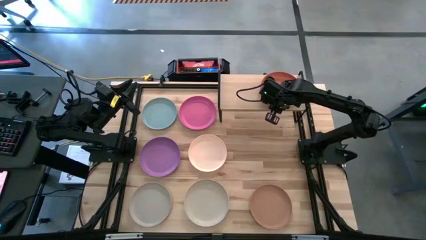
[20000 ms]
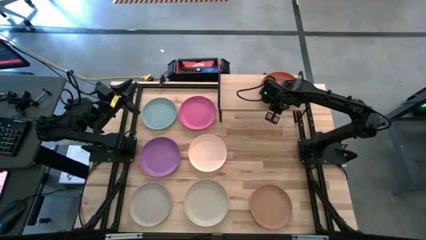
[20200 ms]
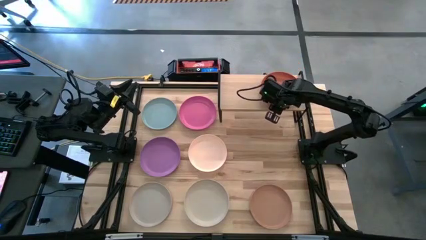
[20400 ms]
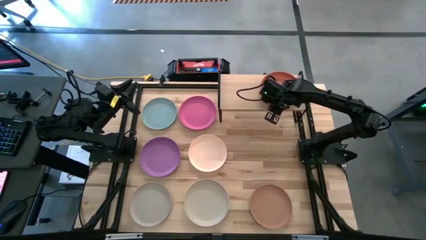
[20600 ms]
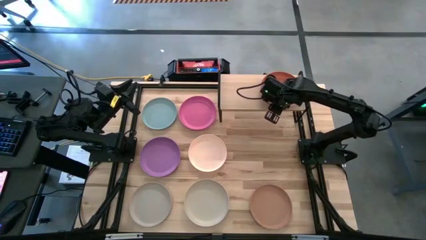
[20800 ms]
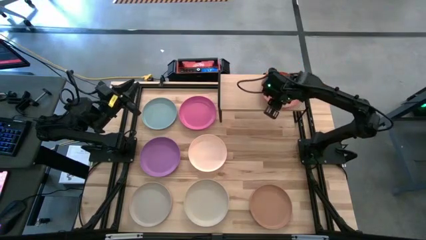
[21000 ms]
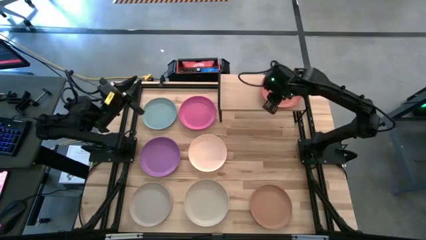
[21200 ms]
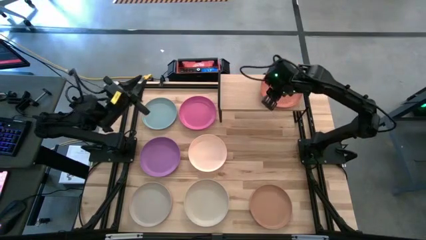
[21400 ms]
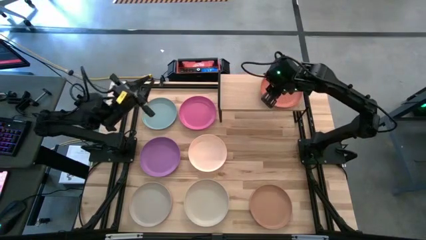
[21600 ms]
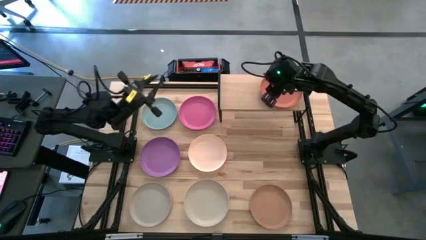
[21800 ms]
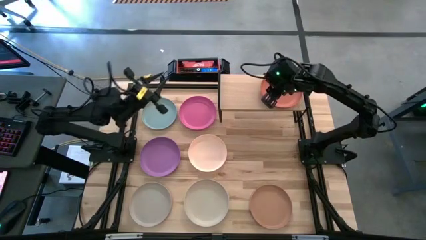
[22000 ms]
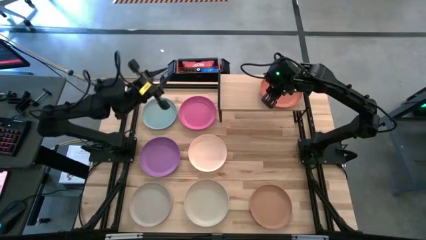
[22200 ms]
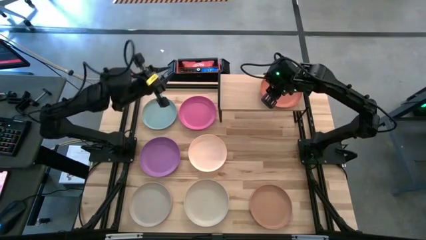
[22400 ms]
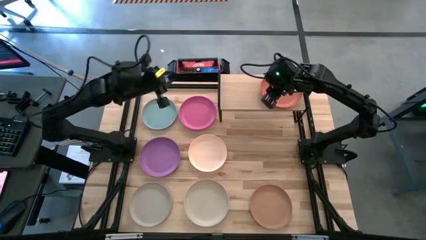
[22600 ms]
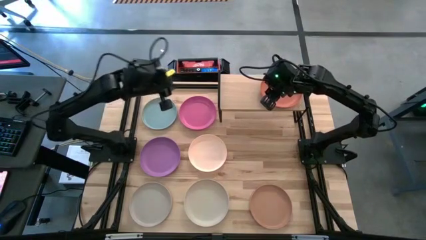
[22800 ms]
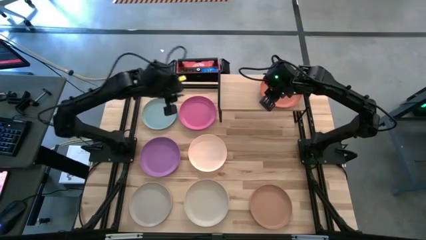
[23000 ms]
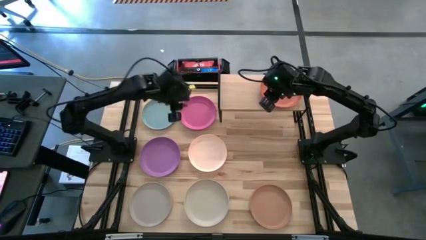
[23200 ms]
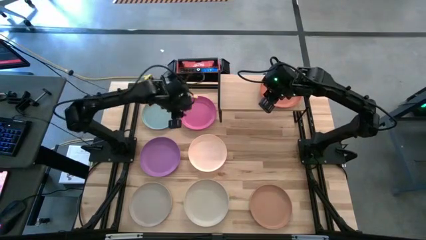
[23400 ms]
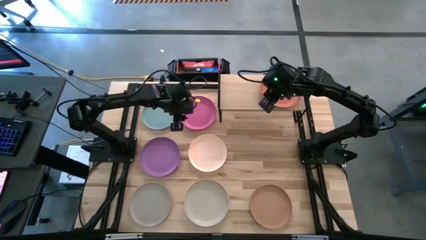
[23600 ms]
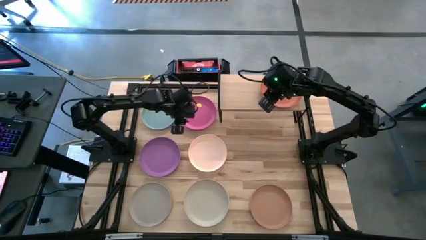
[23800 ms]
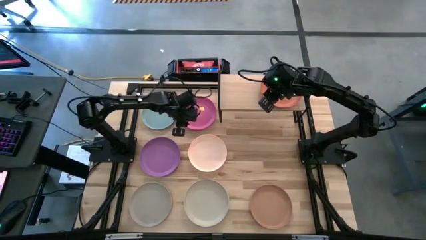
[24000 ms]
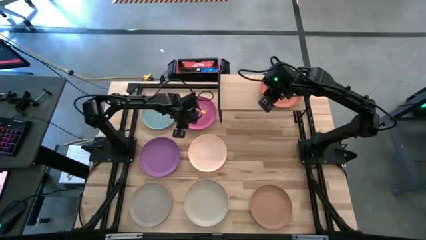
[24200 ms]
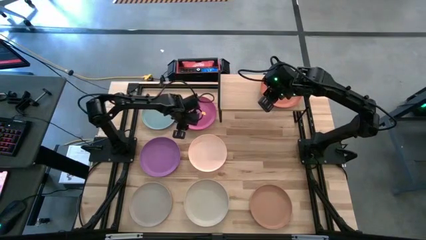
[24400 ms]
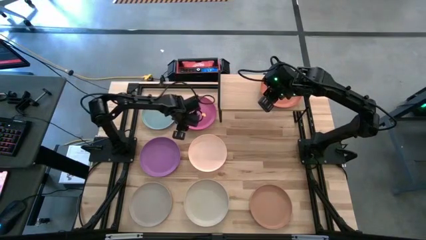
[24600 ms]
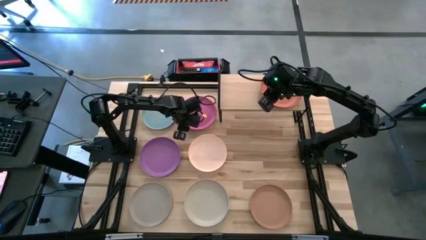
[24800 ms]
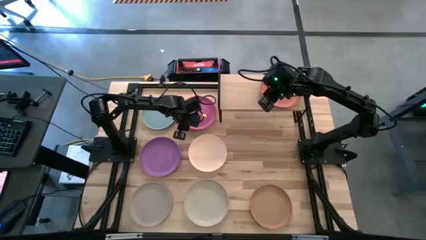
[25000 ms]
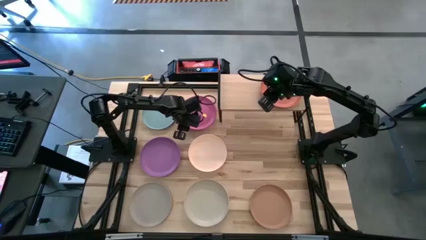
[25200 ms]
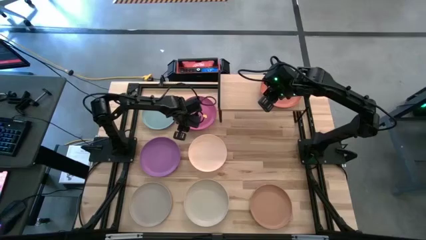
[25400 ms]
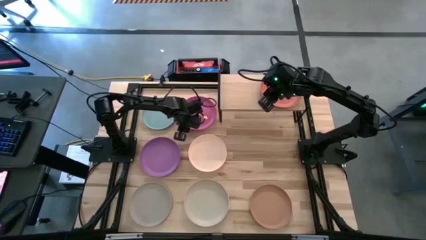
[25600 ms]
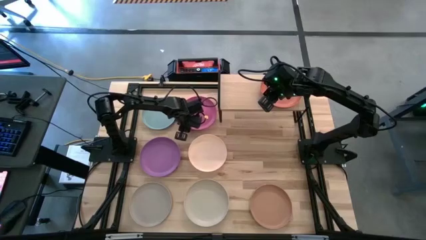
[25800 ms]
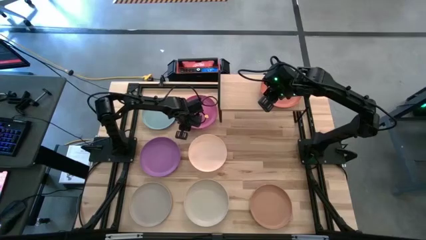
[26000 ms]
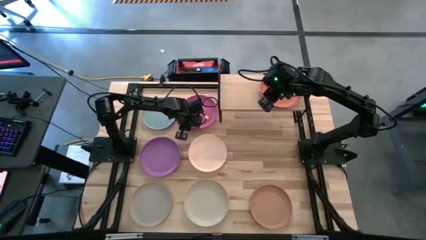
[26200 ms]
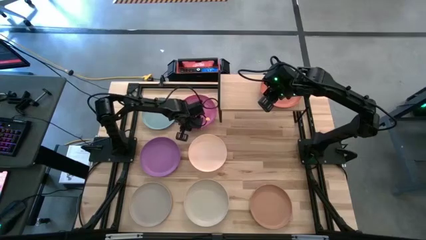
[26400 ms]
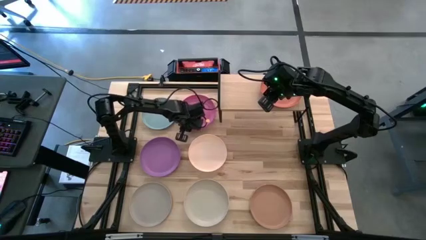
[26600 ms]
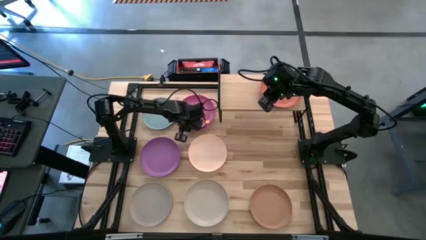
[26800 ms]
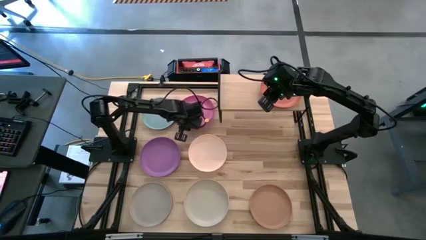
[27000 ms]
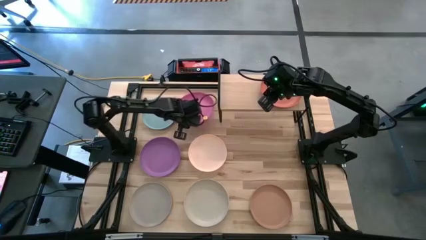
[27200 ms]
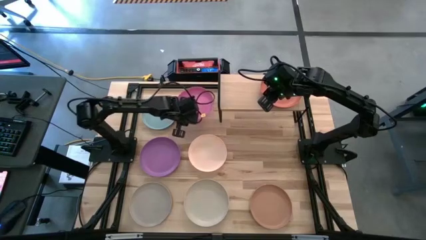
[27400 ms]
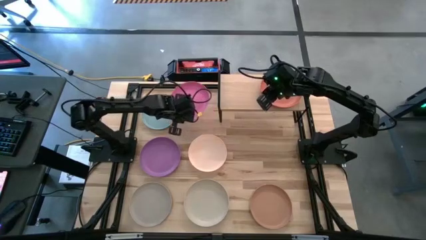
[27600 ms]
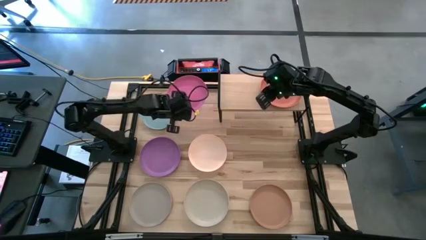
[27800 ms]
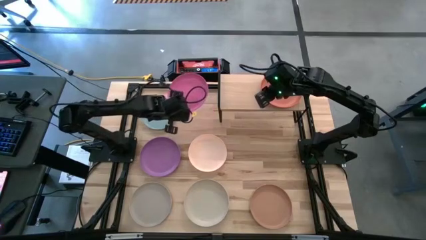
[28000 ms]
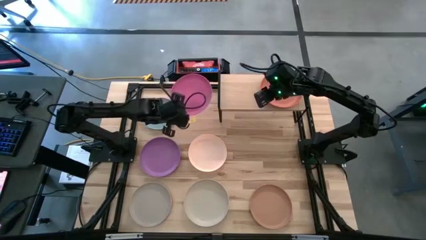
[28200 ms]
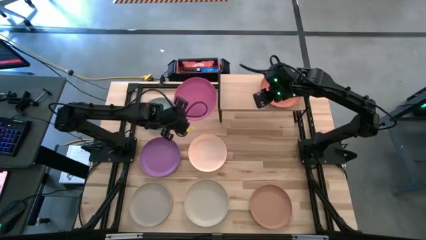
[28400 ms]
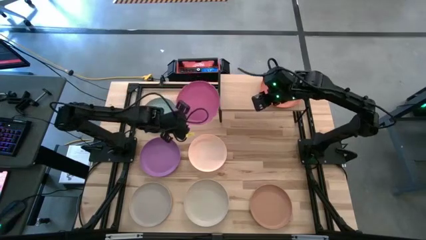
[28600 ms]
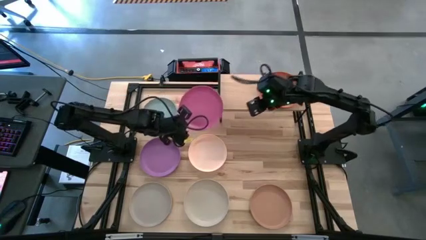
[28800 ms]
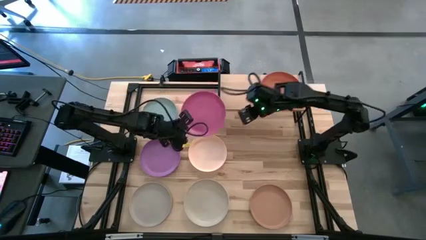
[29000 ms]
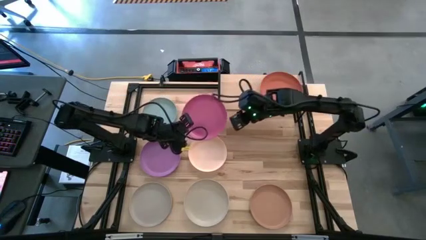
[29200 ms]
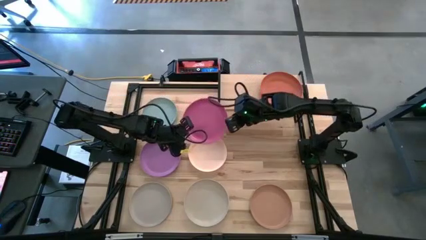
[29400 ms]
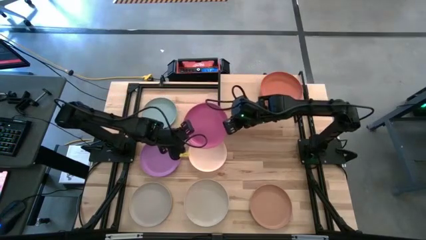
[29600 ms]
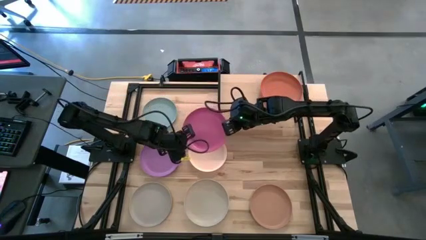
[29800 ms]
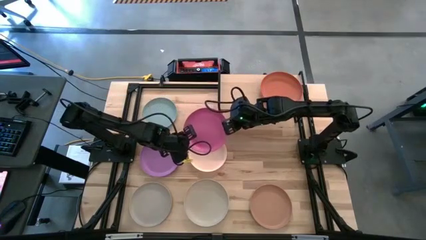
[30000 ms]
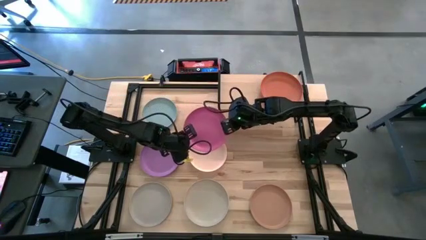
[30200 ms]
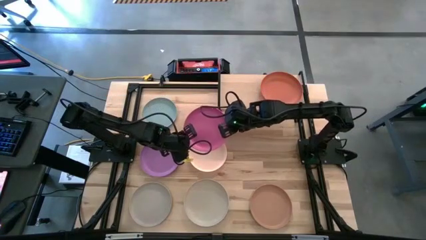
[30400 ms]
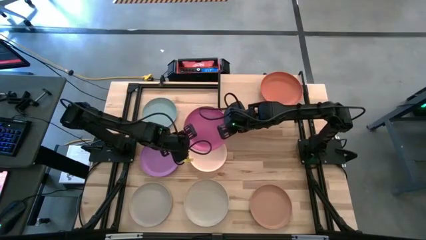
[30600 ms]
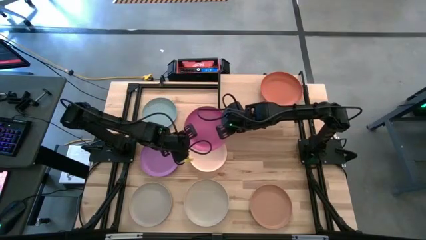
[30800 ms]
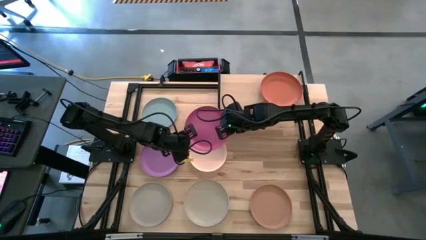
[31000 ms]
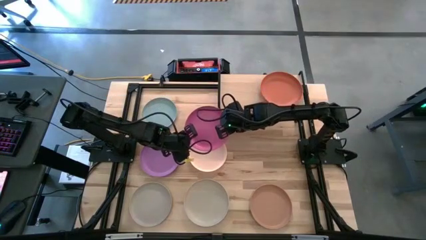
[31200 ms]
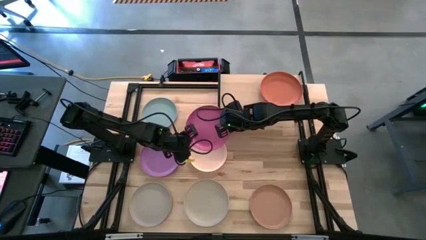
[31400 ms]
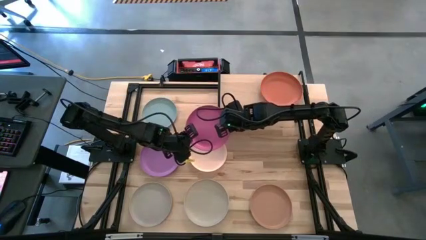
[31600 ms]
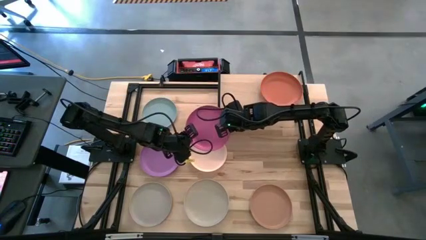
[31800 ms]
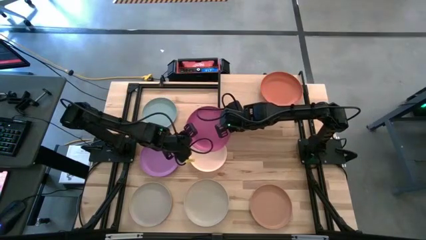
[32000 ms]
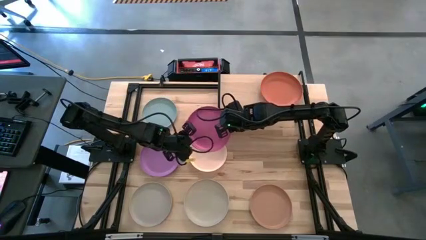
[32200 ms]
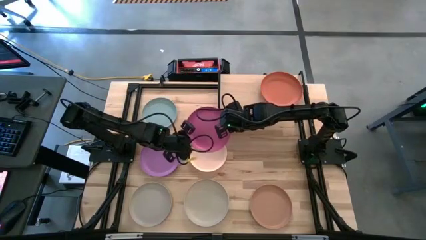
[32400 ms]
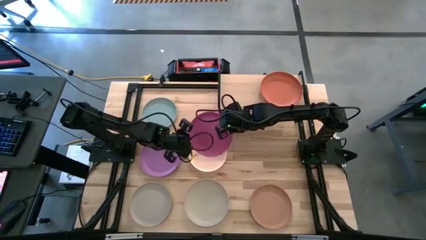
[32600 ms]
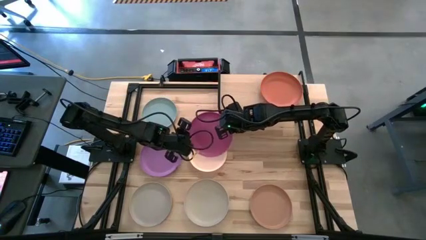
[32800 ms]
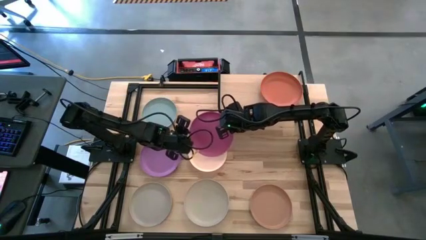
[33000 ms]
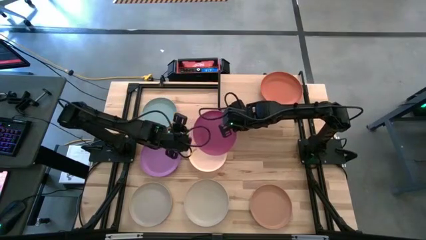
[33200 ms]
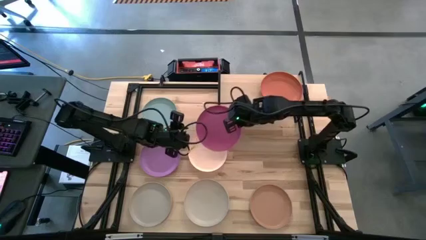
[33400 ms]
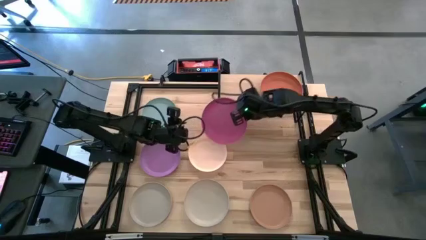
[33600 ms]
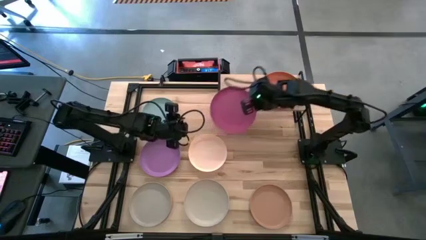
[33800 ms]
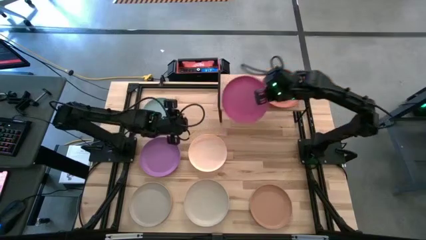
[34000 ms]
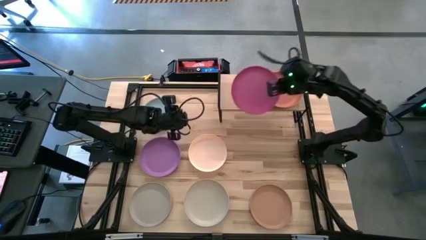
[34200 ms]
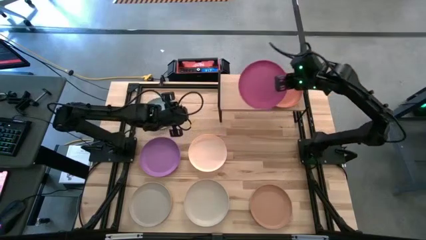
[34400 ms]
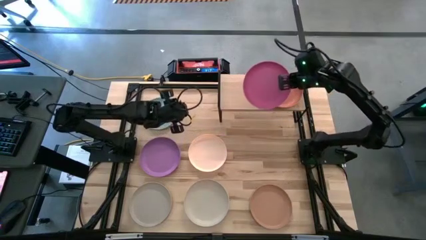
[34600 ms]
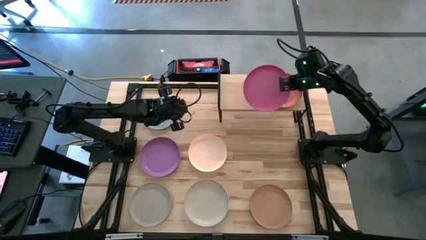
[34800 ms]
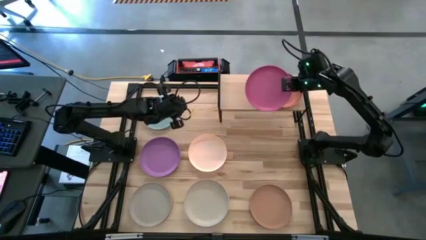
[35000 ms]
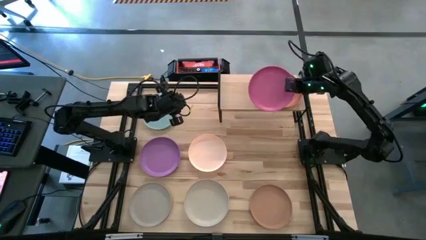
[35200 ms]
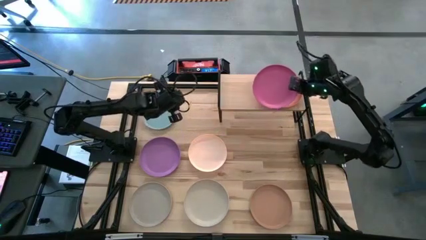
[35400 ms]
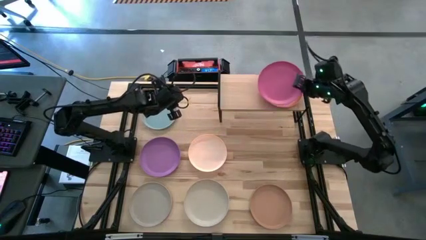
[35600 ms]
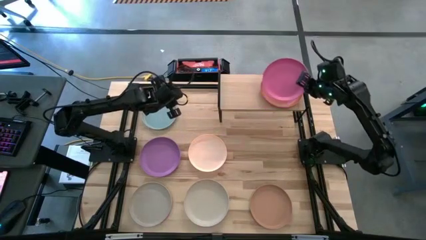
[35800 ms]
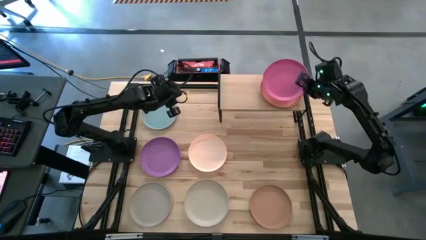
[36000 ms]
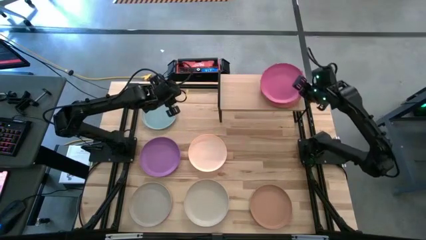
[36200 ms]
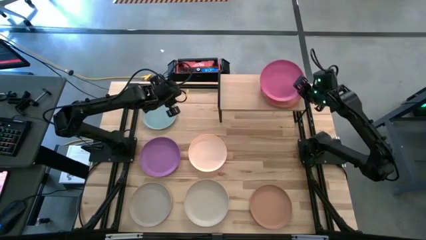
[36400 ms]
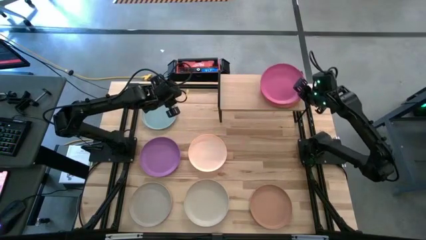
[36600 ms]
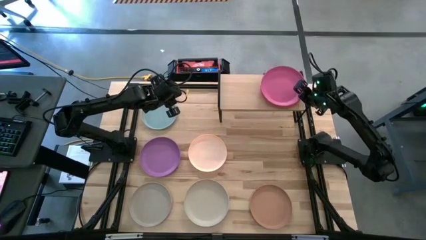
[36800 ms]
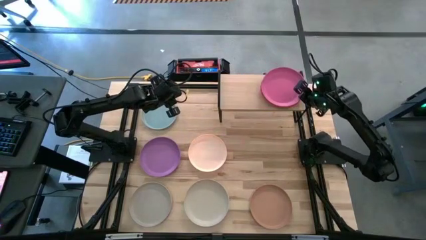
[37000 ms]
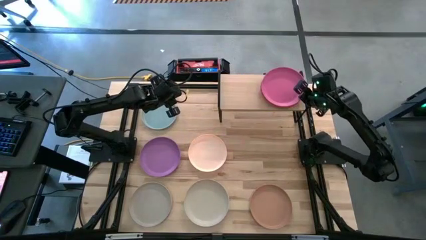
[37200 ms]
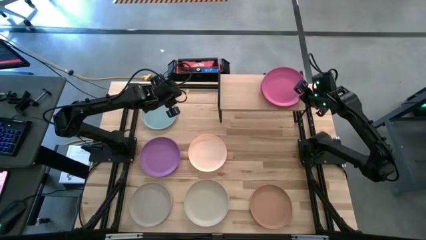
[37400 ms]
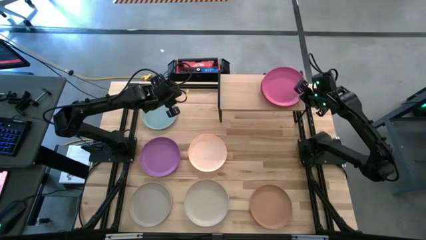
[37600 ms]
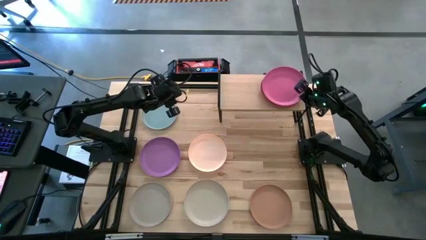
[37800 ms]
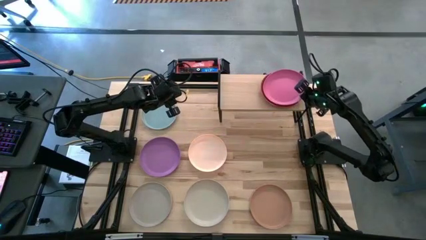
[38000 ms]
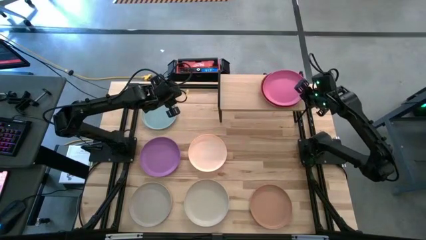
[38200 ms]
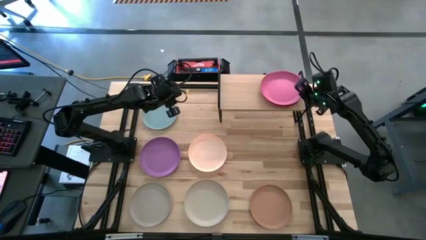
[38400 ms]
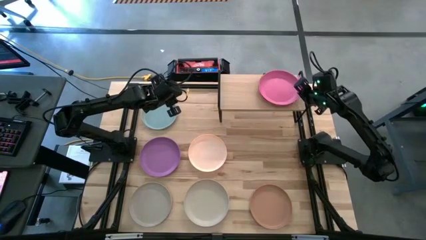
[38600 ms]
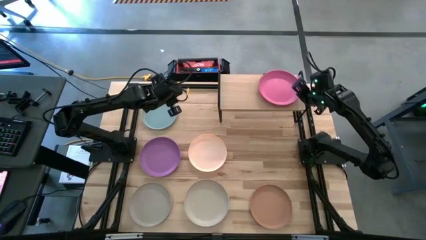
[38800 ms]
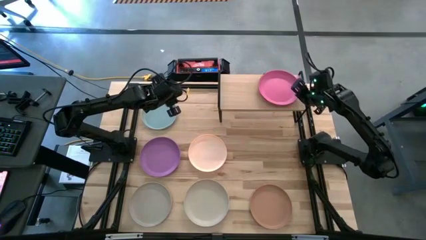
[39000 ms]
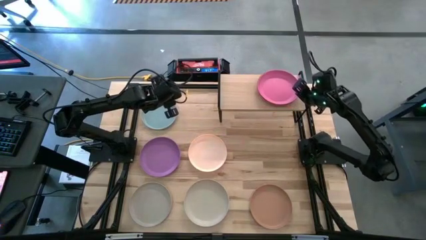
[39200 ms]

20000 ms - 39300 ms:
Task: Place and stack plates onto a shelf
Stack the pink plate on top of the orange plate on the shelf
